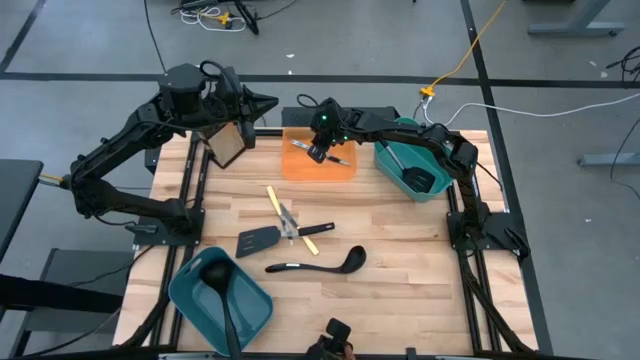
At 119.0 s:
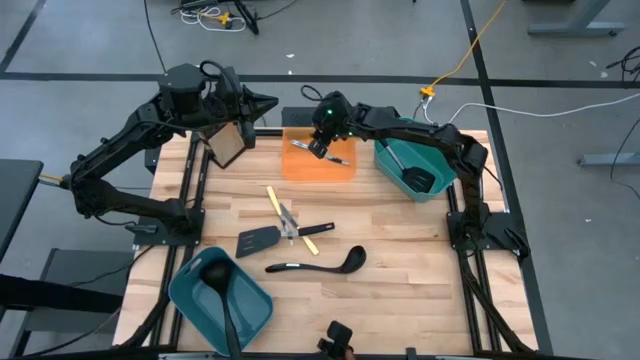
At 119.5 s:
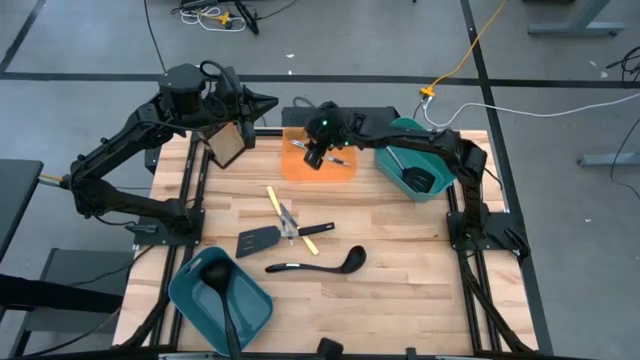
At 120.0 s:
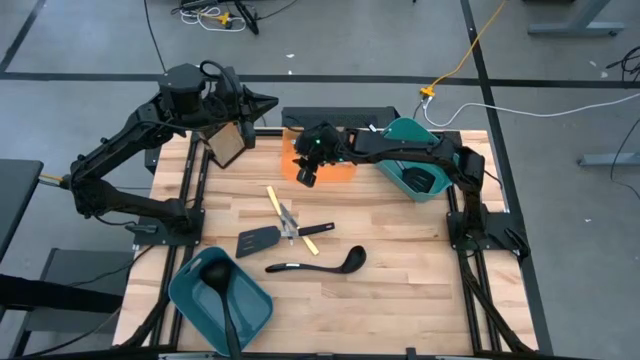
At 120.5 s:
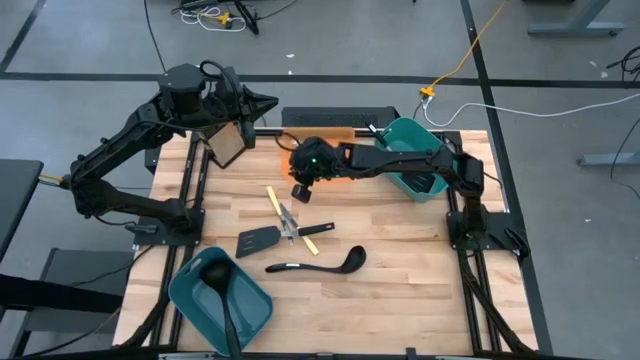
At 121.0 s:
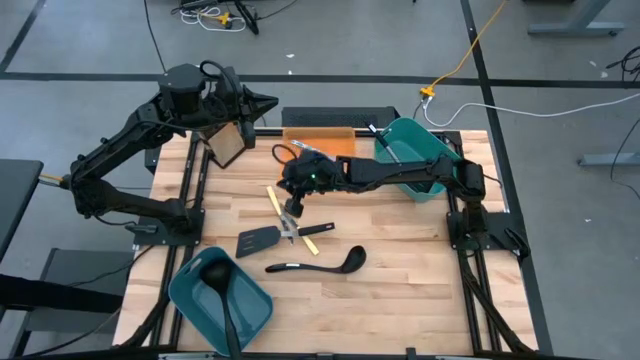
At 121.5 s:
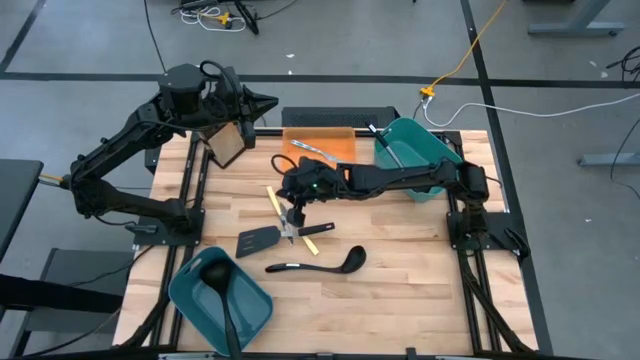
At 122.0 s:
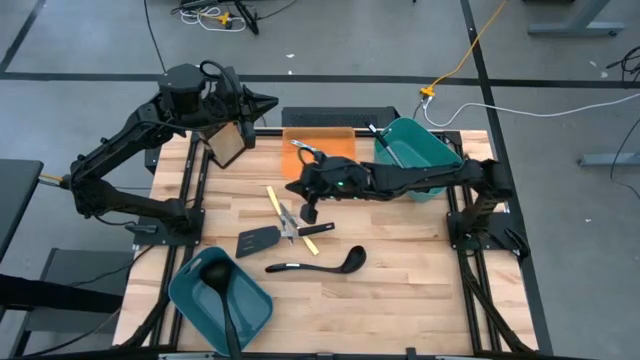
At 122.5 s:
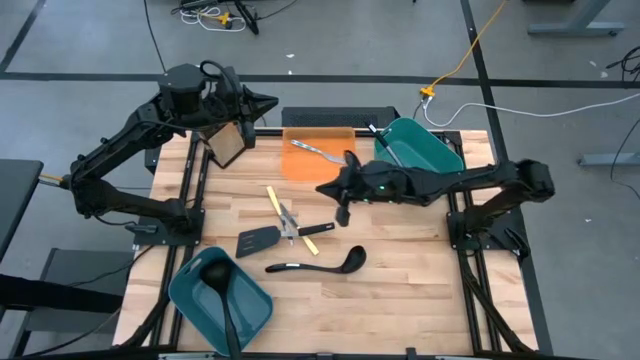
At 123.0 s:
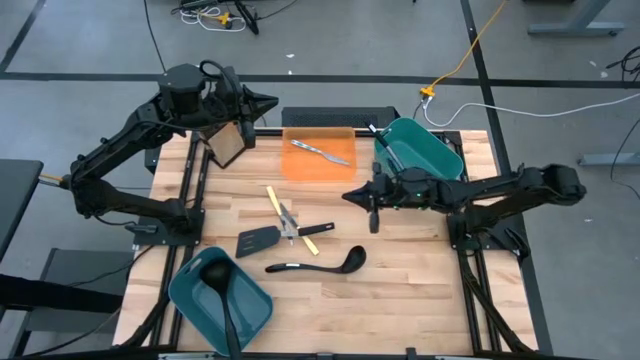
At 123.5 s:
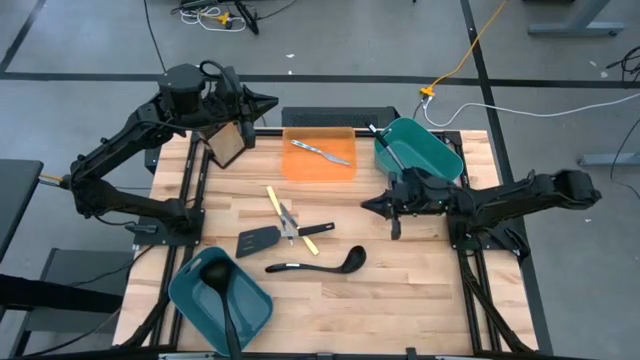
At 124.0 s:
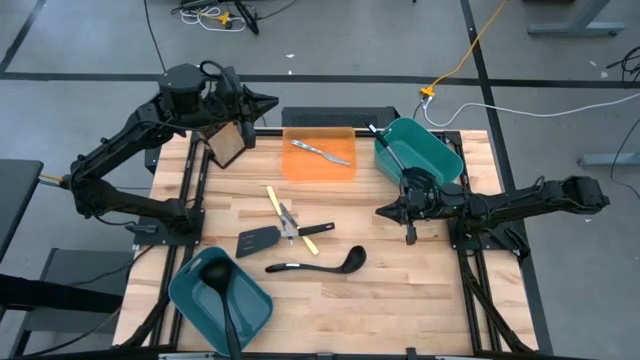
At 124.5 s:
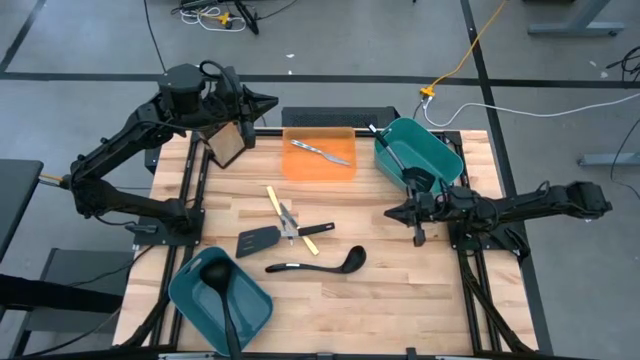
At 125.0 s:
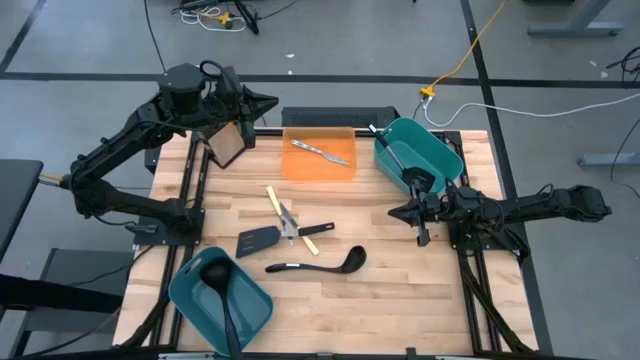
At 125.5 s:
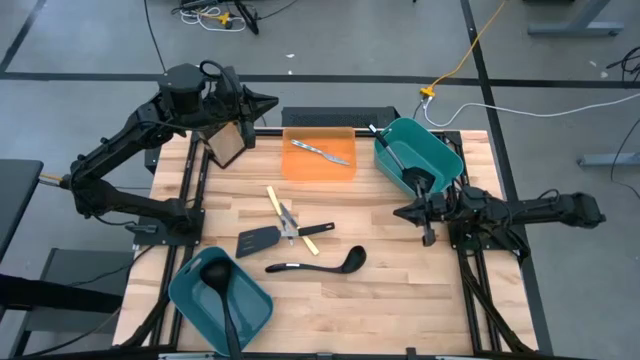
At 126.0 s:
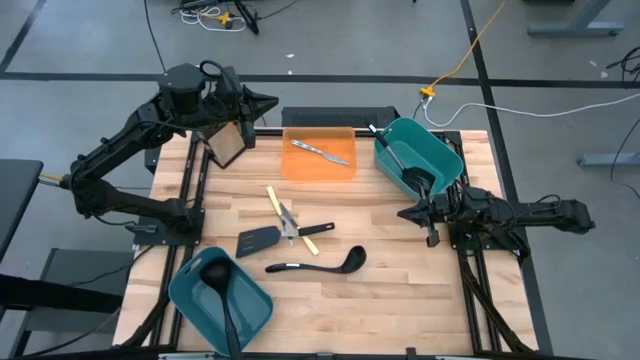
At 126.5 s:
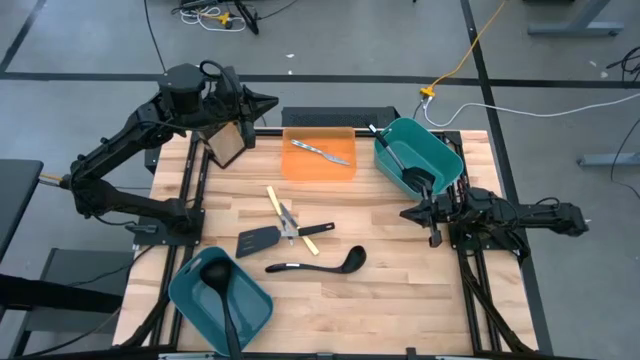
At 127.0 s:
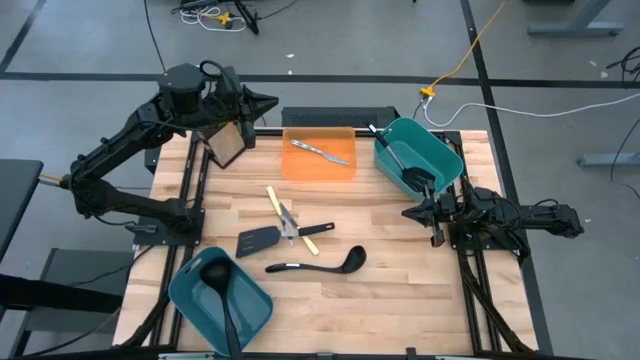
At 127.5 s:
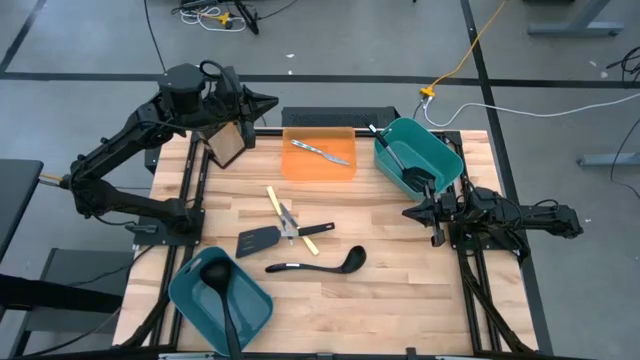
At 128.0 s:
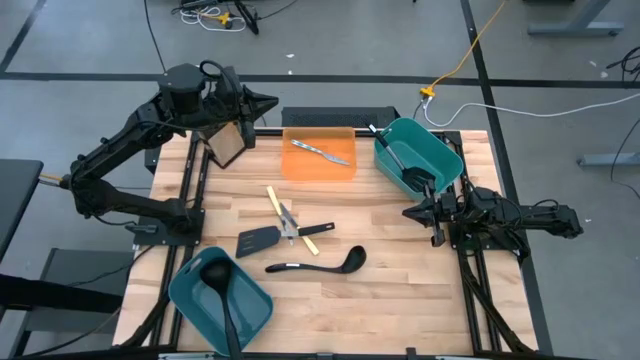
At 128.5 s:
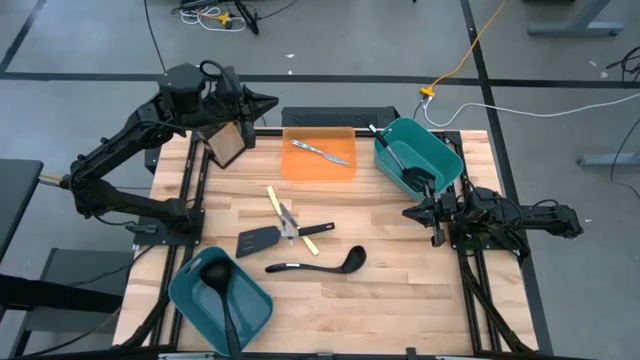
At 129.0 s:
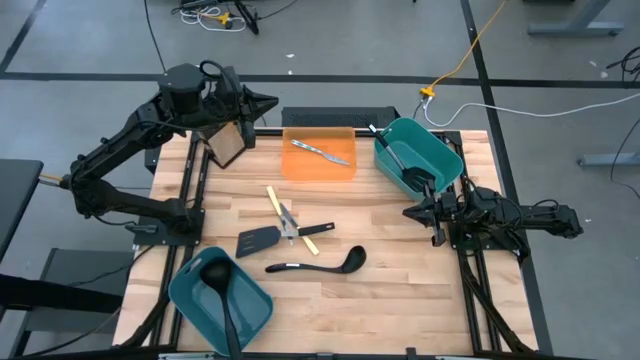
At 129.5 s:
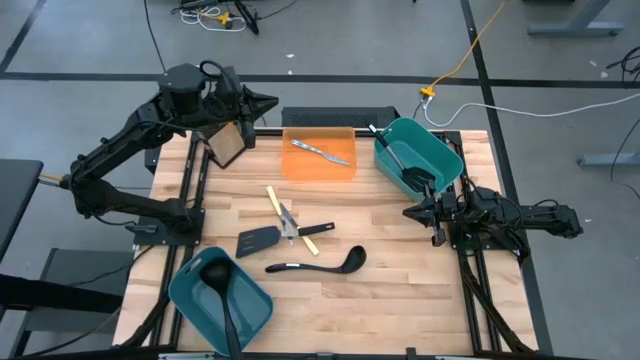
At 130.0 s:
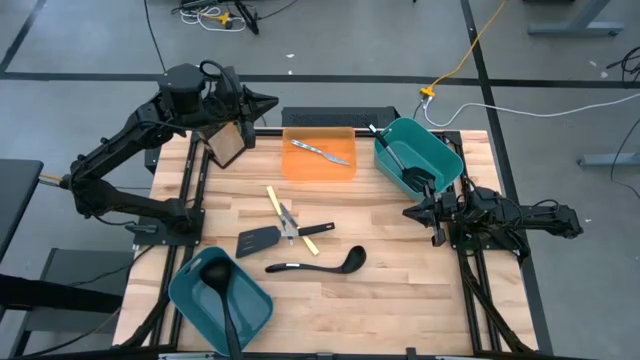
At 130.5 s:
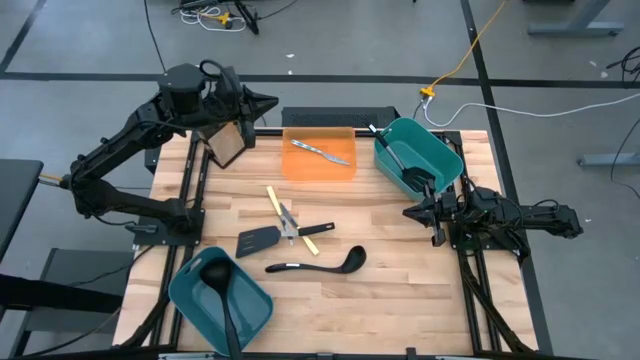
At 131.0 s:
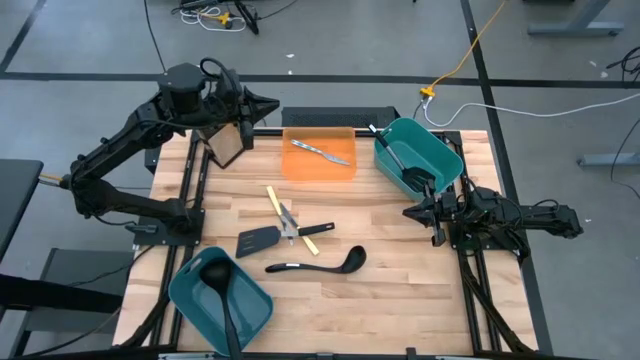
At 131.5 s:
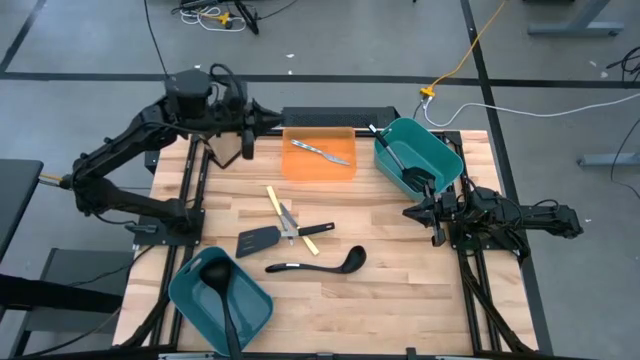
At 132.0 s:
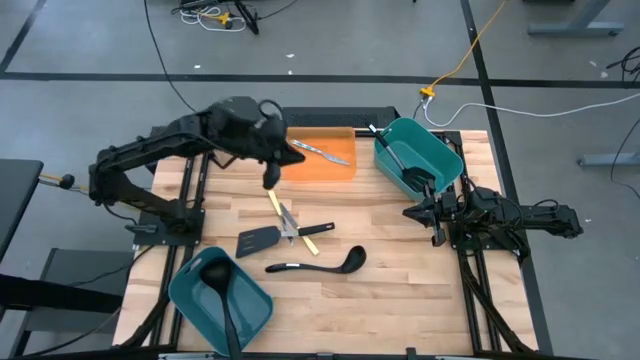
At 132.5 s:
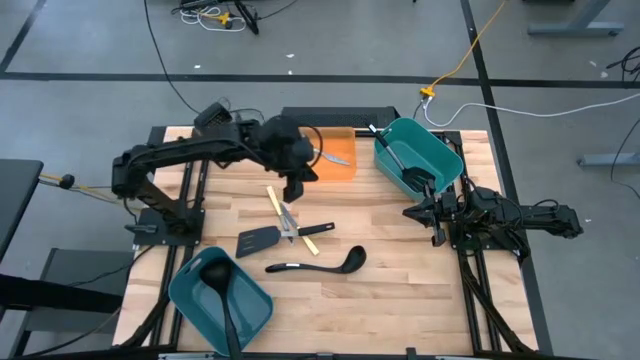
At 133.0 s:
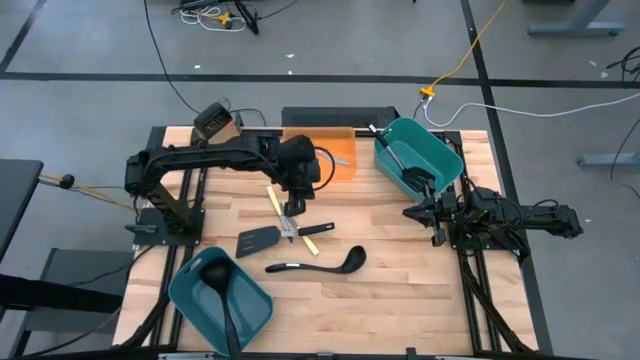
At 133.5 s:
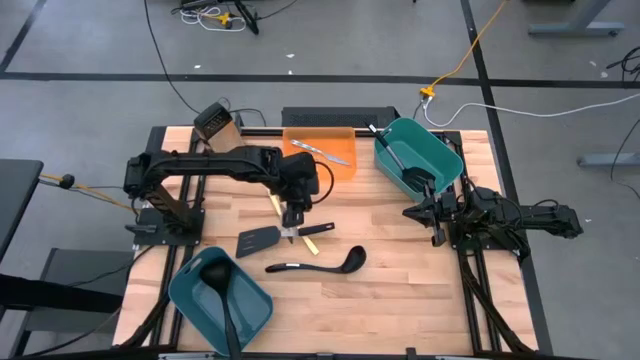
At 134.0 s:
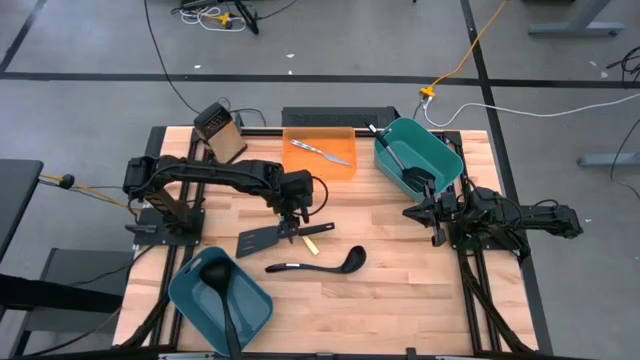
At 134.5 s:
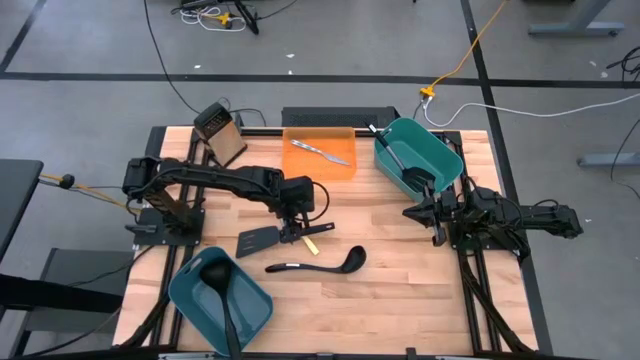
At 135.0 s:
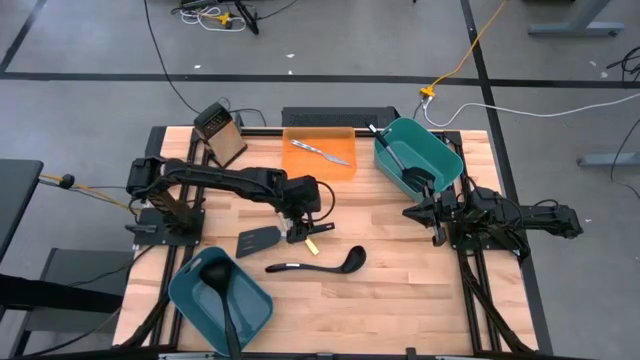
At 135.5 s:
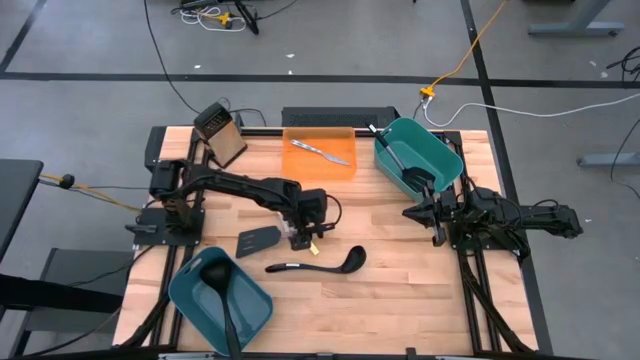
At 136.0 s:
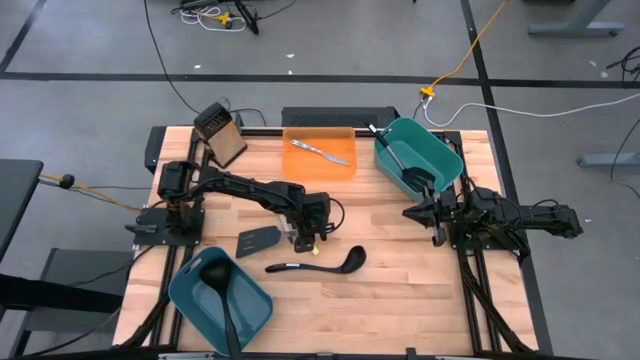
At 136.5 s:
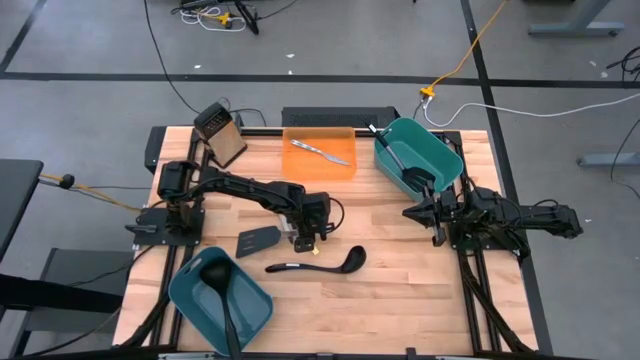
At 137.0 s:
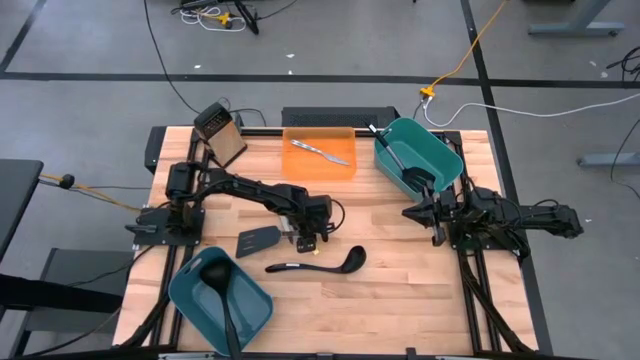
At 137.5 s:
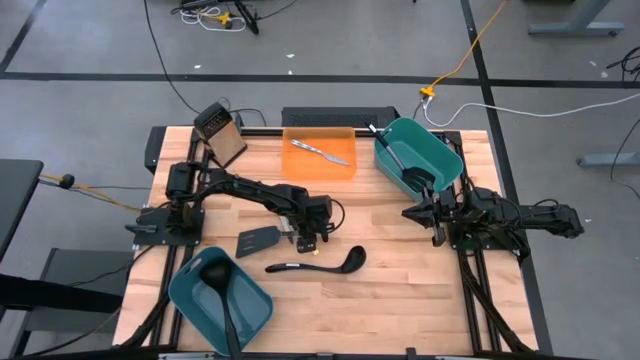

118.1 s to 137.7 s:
Task: Pick & Place Kitchen Items
Put the black spatula into the green bin

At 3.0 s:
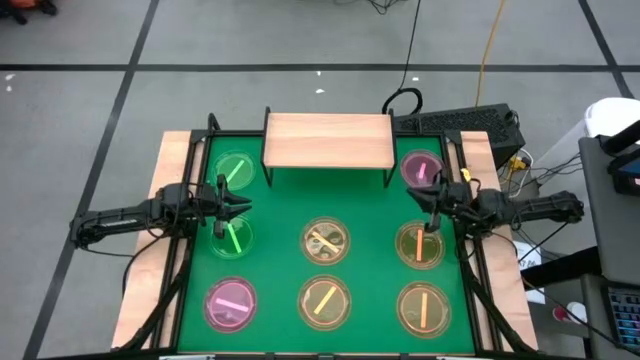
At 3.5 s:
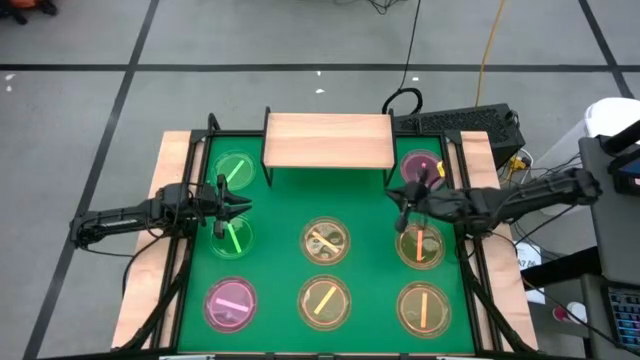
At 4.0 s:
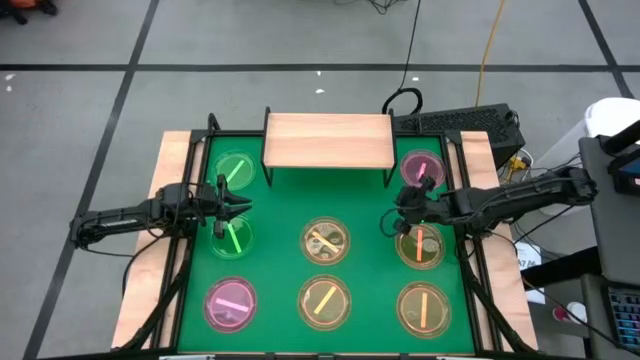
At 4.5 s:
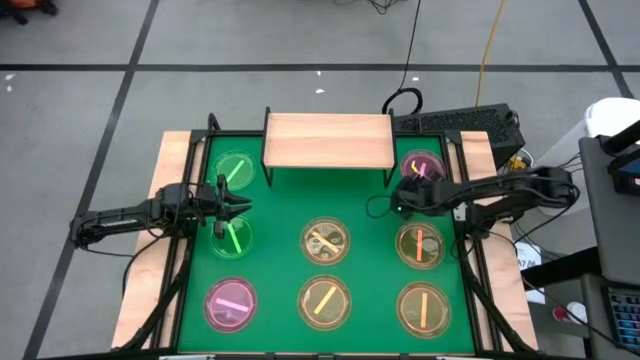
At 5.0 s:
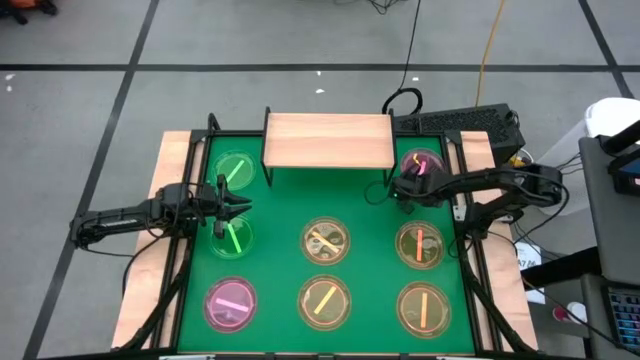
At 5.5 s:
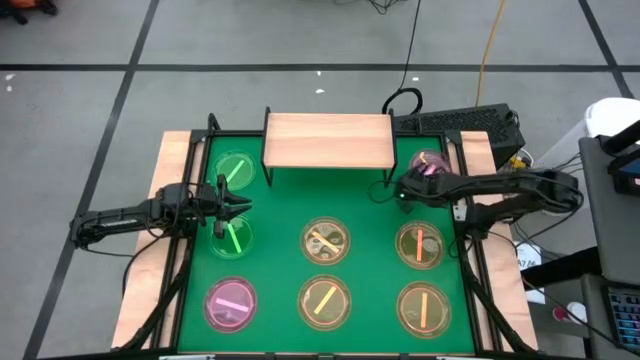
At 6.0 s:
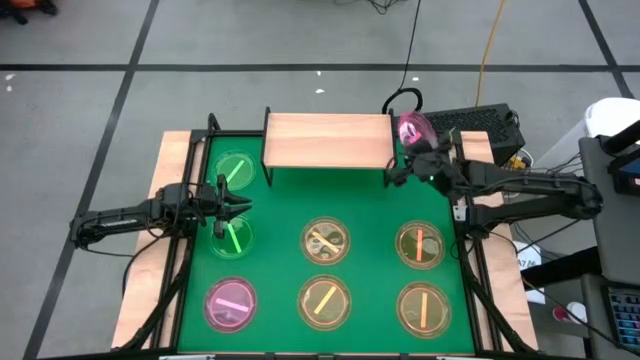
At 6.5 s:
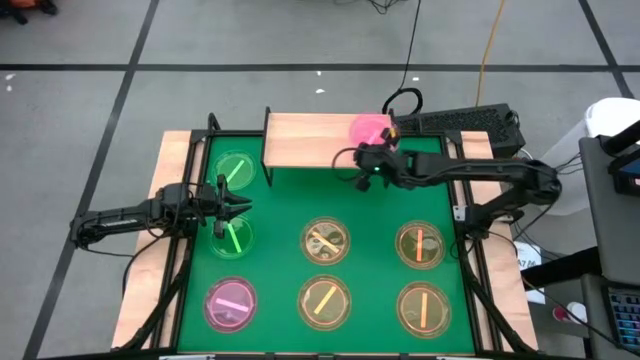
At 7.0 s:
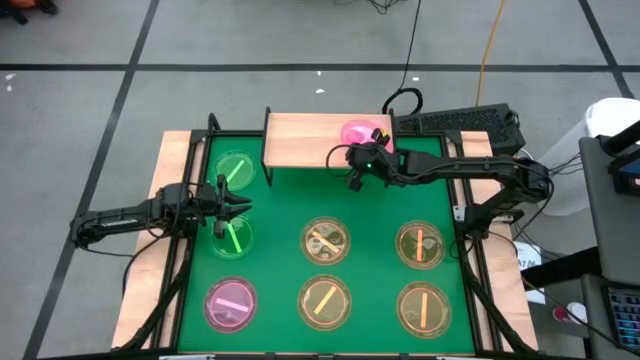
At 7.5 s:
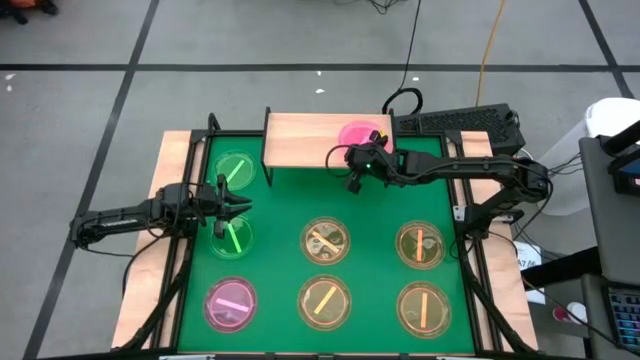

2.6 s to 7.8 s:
Task: Place and stack plates onto a shelf
Put the top pink plate on the shelf
